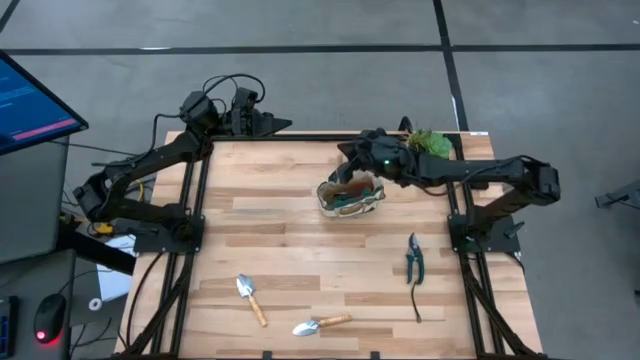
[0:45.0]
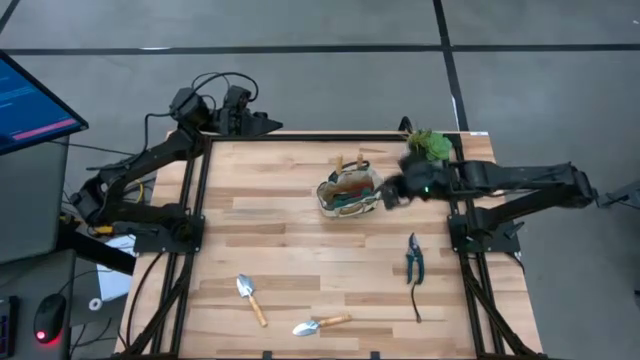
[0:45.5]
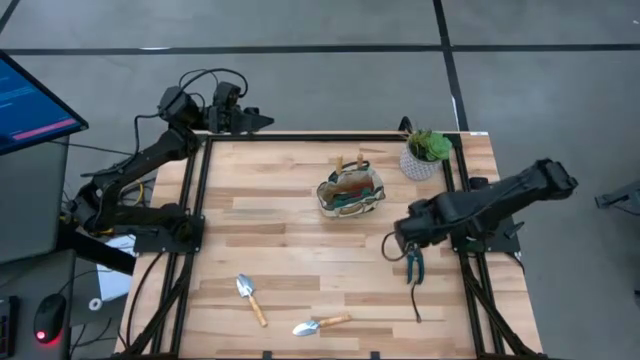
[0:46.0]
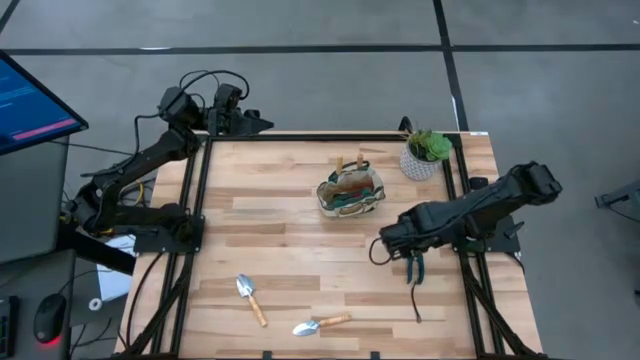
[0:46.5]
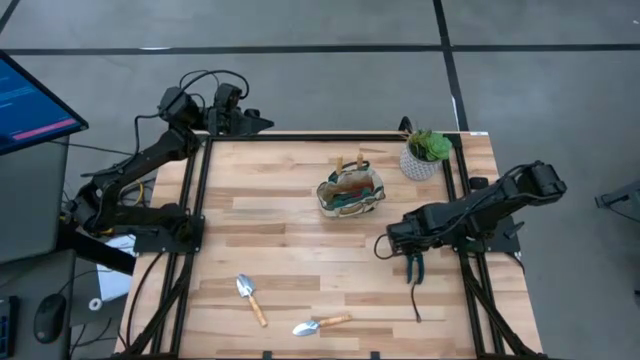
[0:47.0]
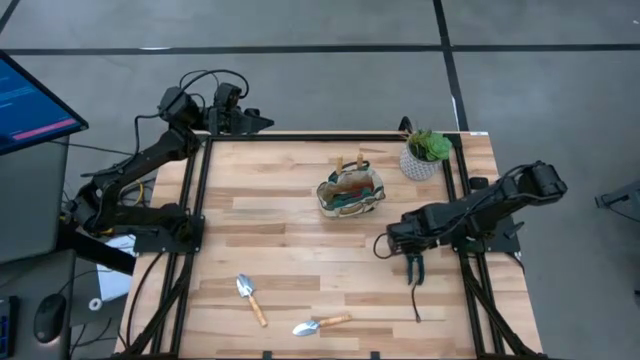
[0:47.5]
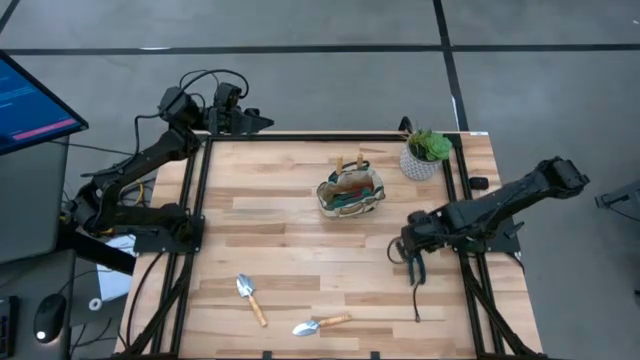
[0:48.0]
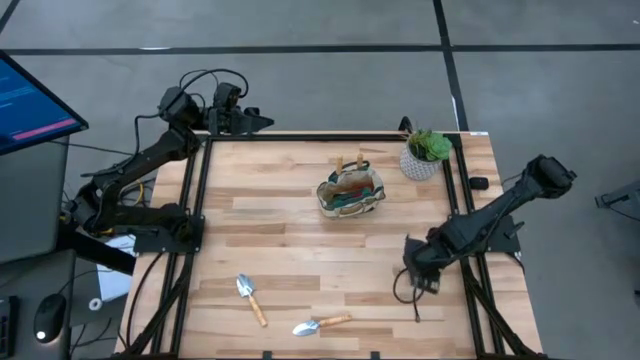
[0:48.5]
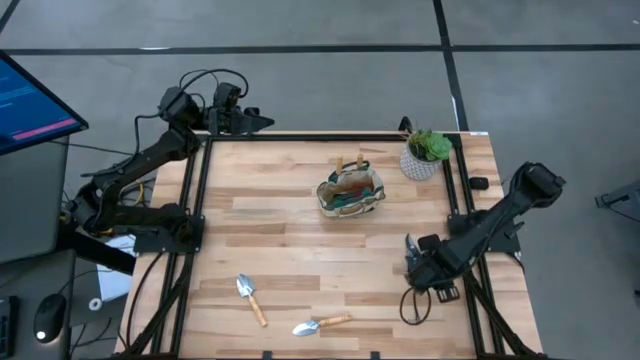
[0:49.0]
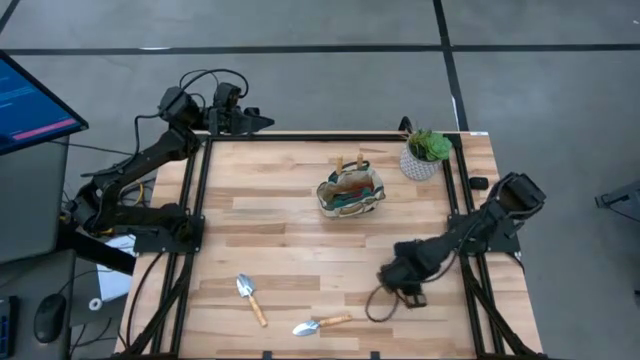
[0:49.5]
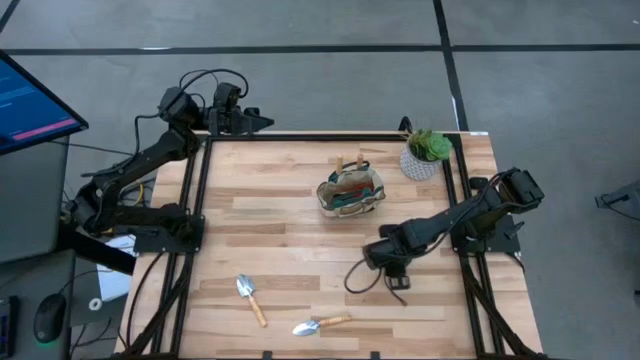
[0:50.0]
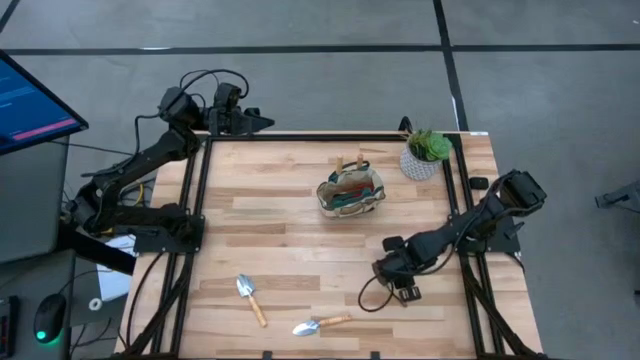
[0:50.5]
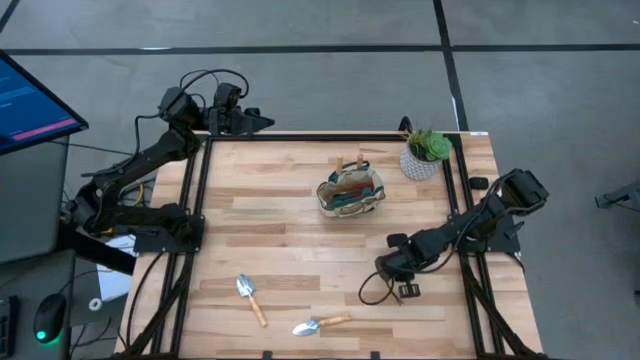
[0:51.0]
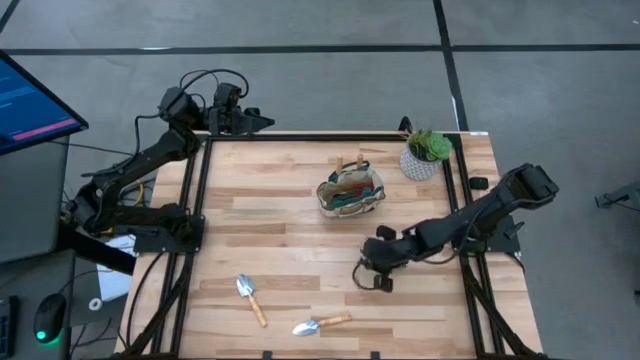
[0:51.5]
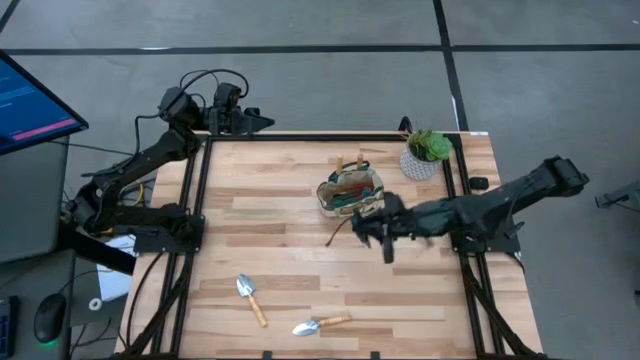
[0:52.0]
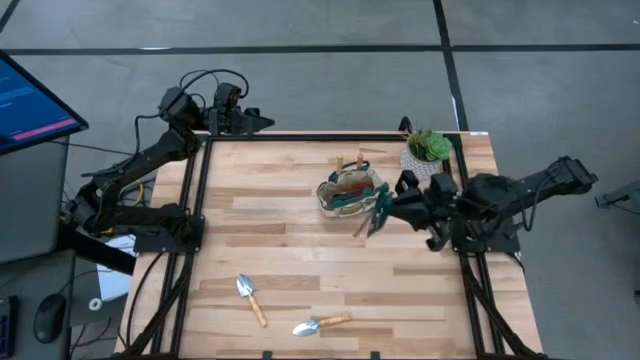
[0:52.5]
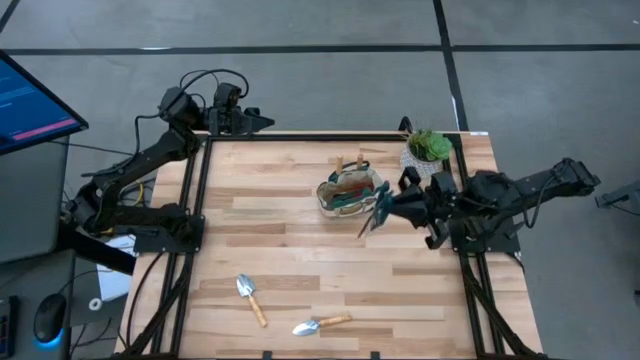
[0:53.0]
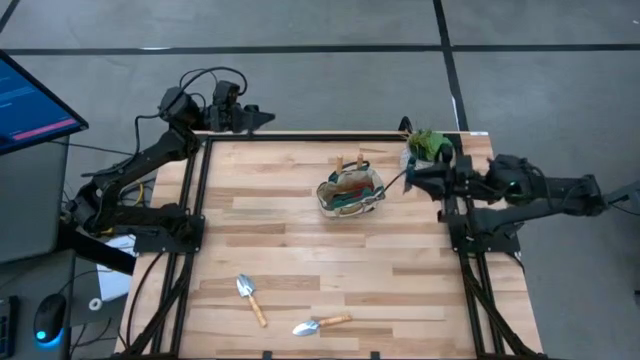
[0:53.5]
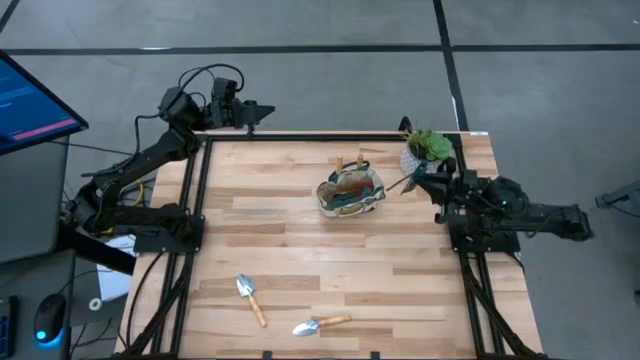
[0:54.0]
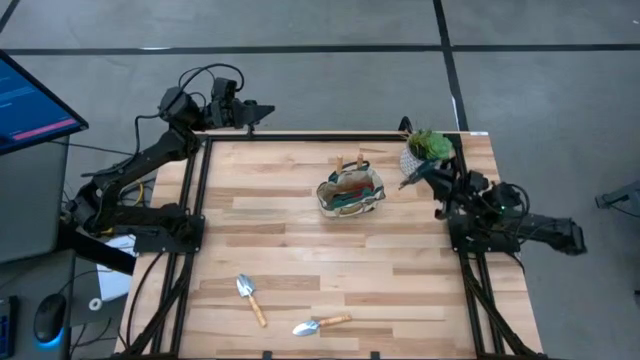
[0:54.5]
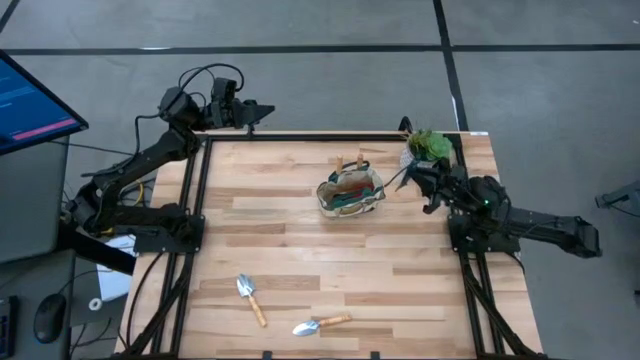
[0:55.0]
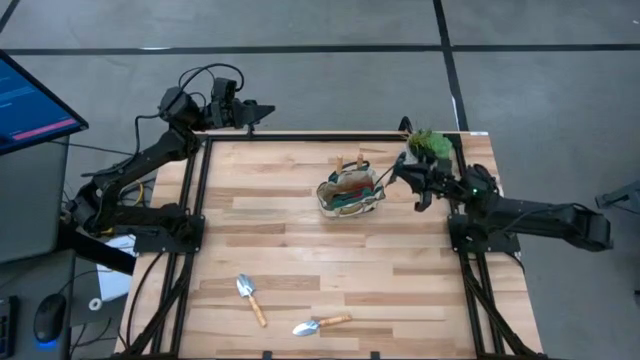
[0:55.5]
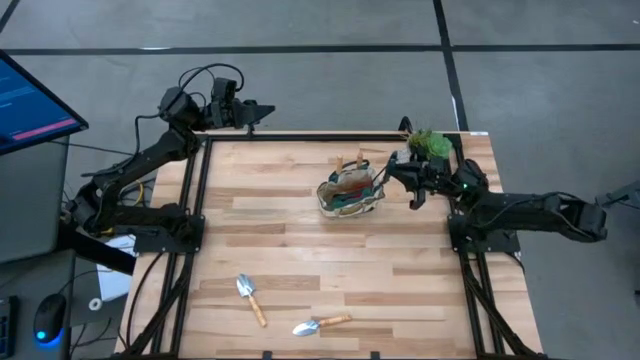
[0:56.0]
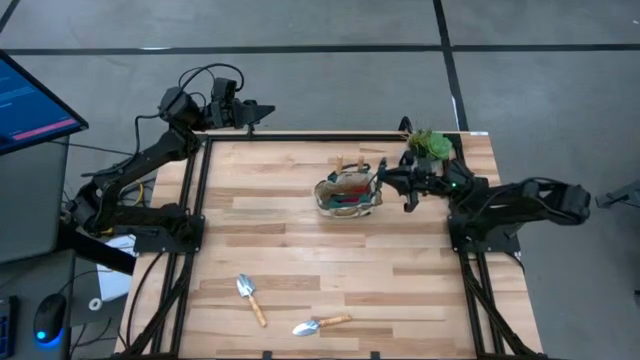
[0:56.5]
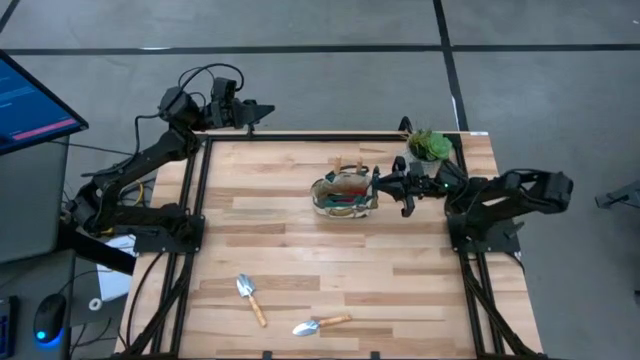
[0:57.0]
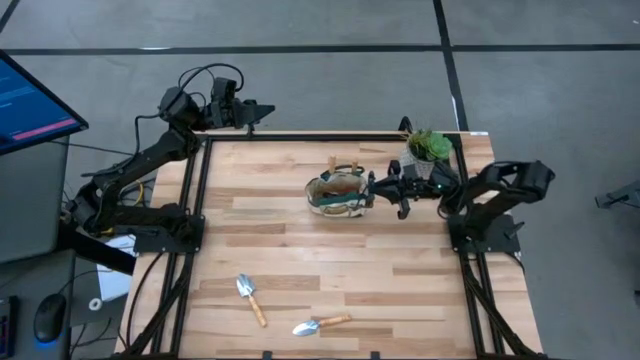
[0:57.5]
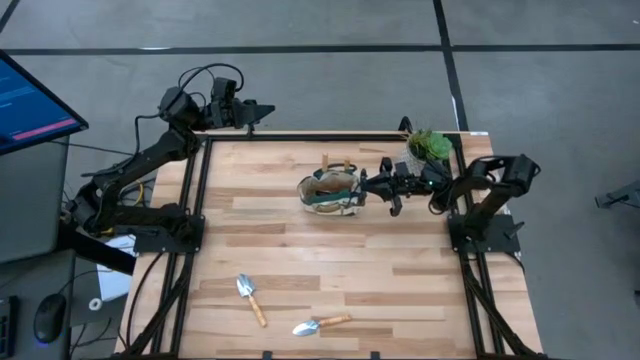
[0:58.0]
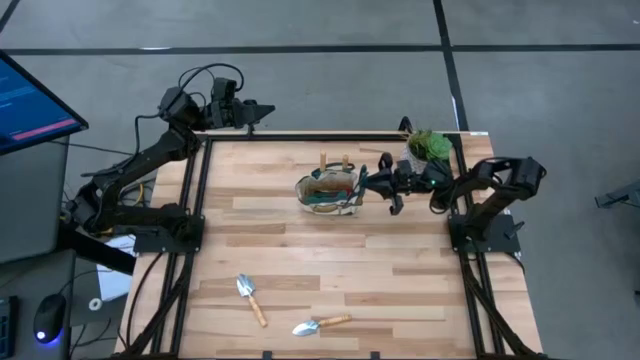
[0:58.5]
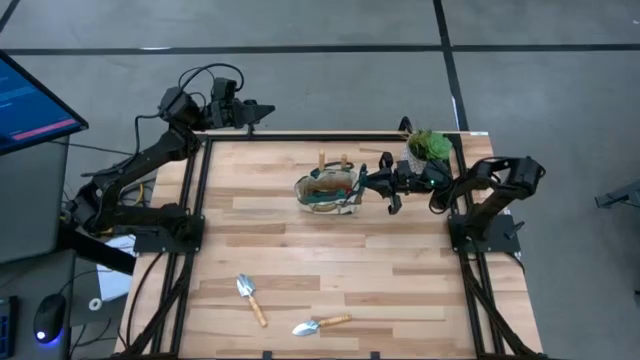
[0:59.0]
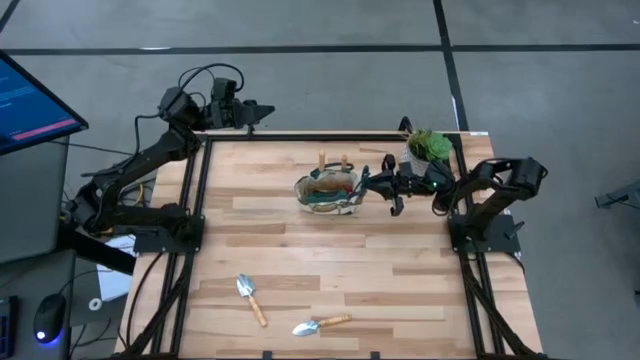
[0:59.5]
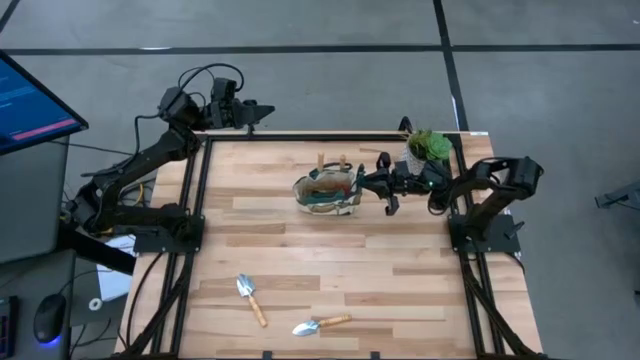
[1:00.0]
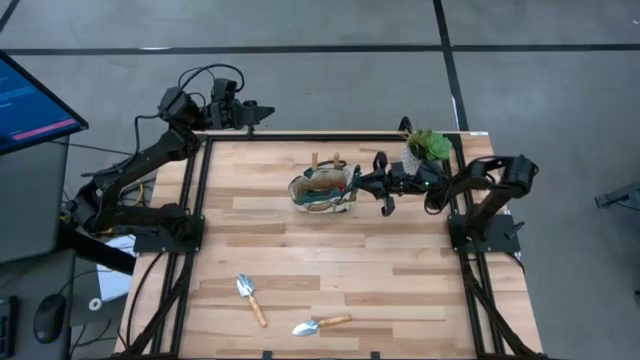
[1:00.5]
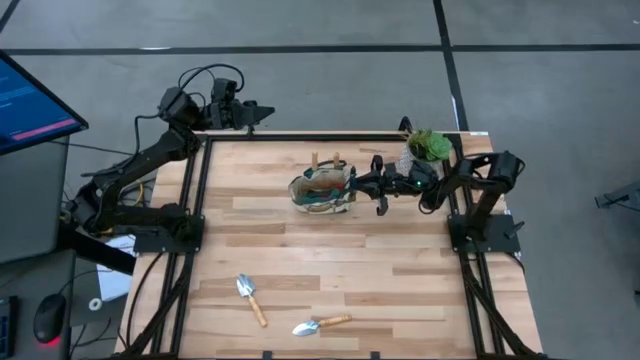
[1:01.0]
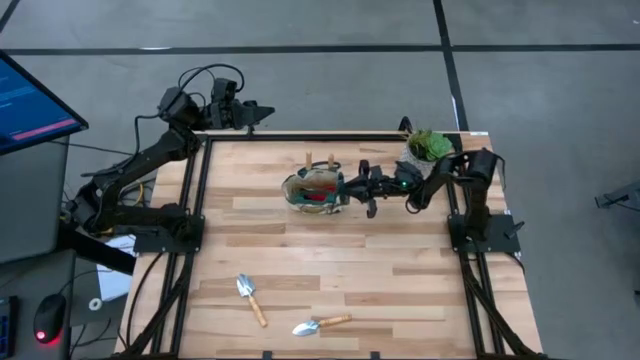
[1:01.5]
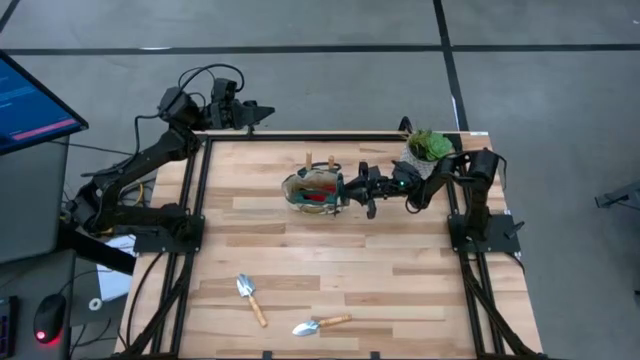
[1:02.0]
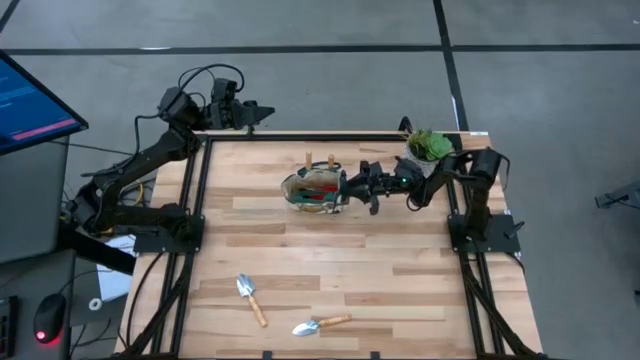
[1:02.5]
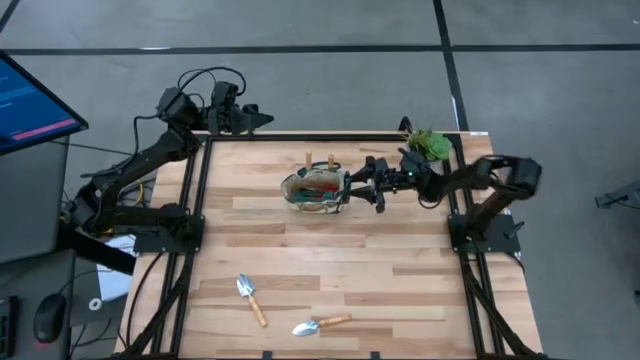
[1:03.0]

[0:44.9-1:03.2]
Task: Pick & Place Garden tools in Gardening bag
Put the shear scissors into the gardening bag

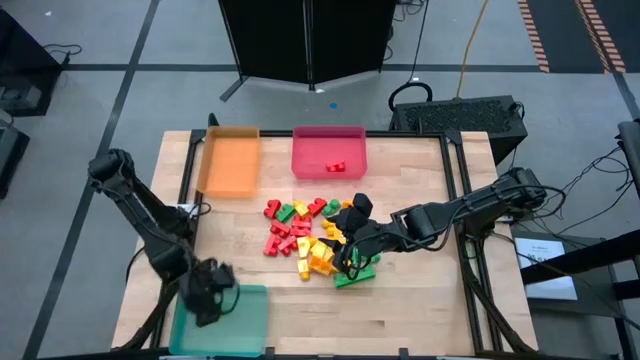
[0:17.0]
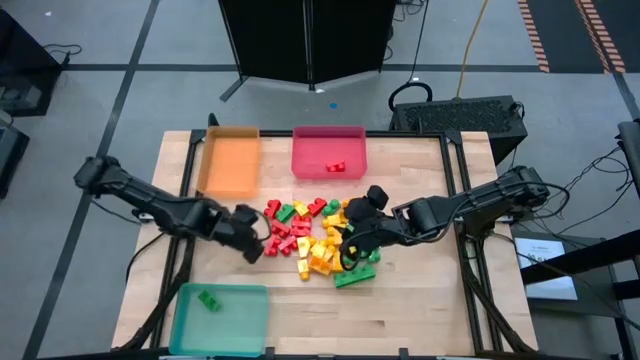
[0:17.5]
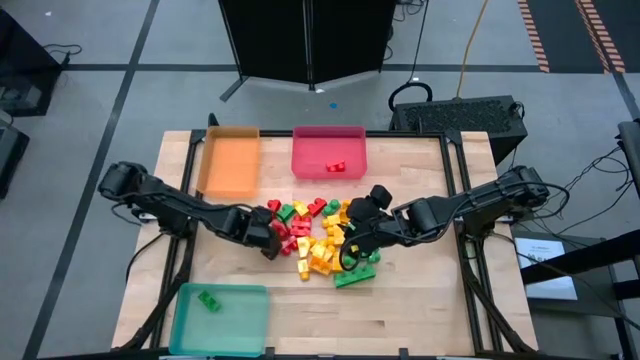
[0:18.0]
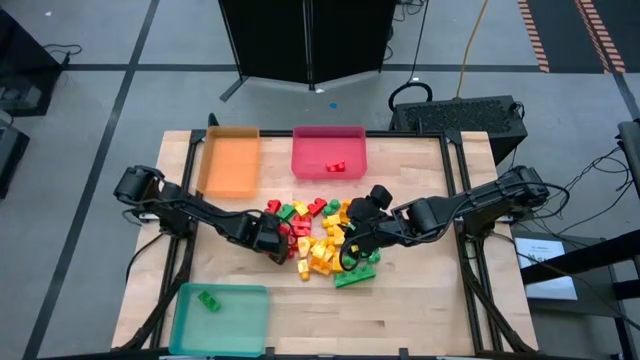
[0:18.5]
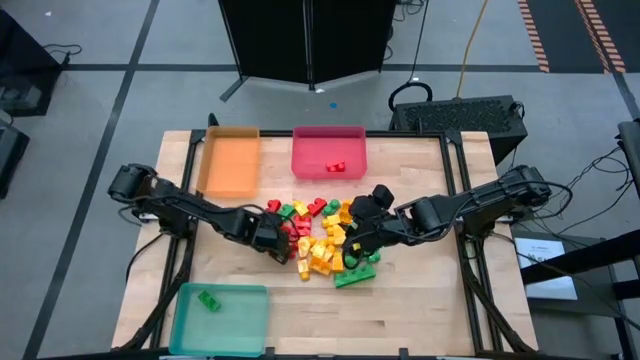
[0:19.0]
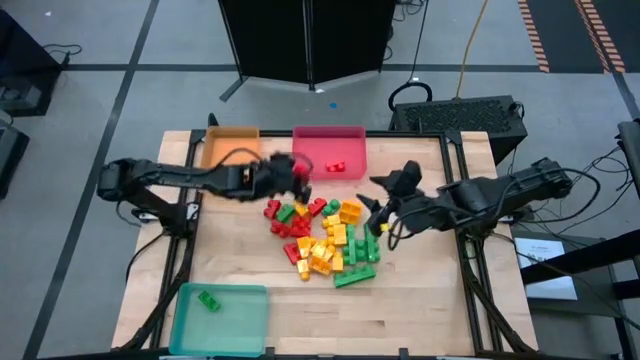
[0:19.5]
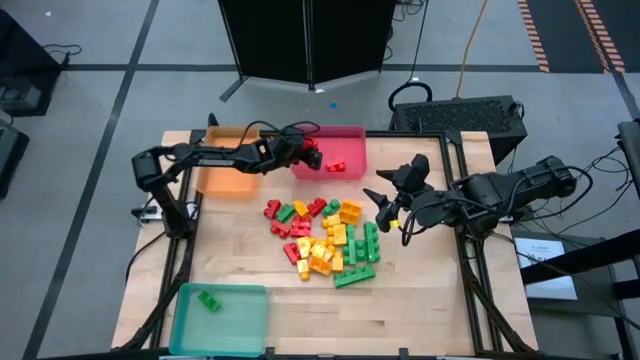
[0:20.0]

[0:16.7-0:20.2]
Task: Sort blocks
Put the red game piece into the red bin
